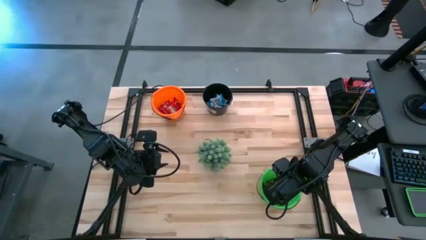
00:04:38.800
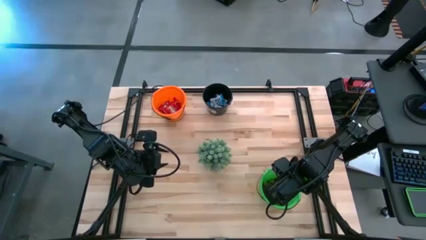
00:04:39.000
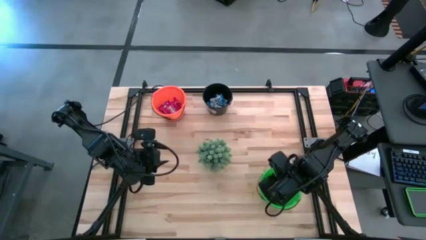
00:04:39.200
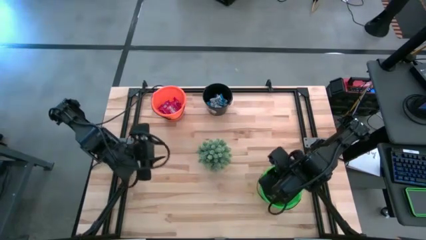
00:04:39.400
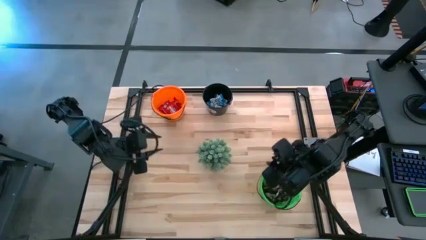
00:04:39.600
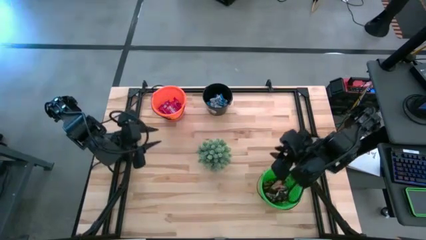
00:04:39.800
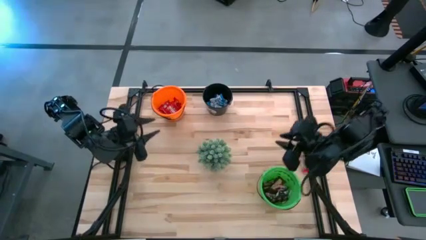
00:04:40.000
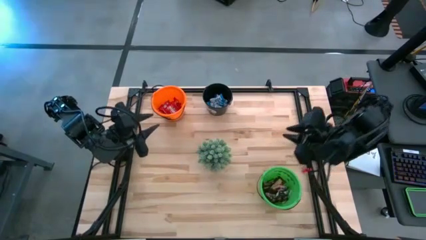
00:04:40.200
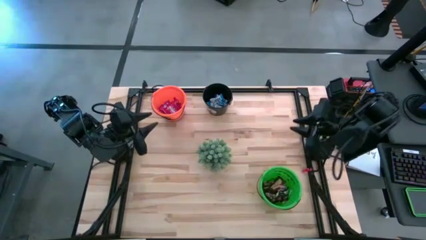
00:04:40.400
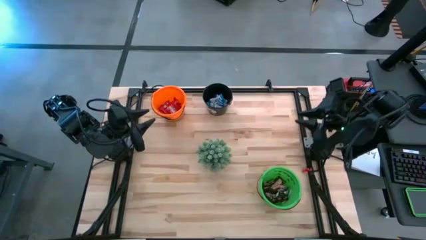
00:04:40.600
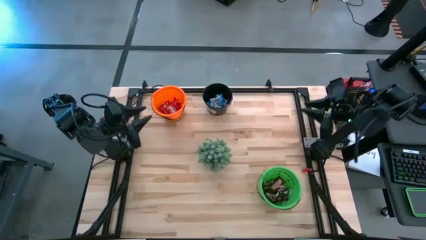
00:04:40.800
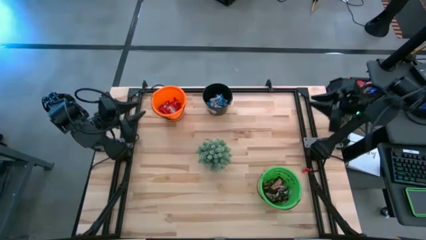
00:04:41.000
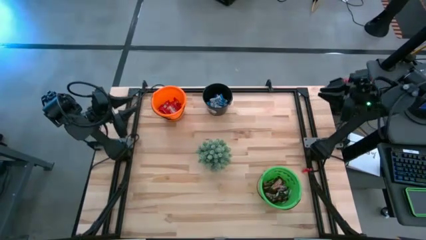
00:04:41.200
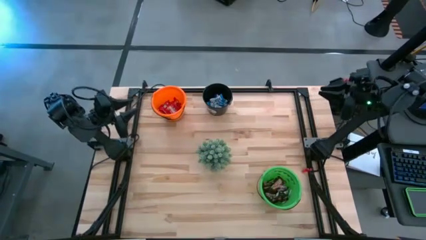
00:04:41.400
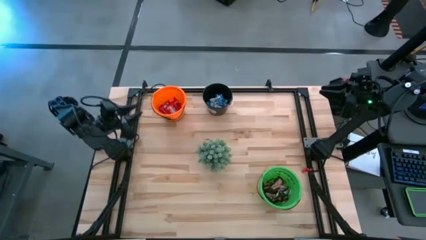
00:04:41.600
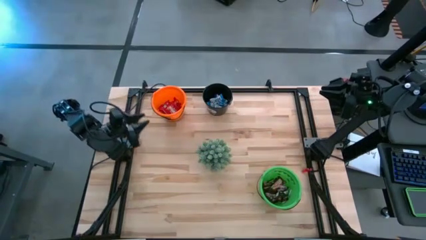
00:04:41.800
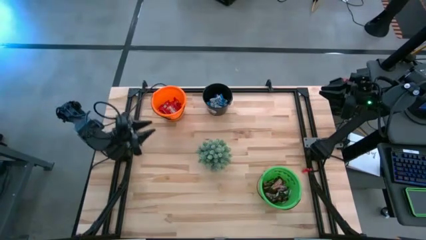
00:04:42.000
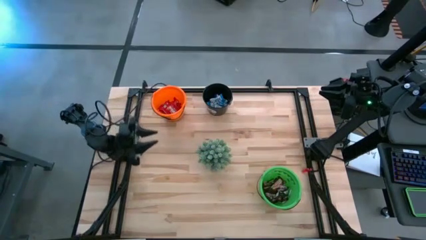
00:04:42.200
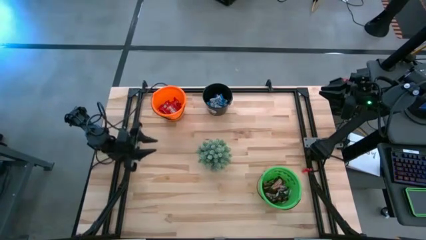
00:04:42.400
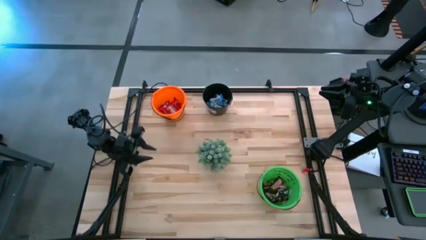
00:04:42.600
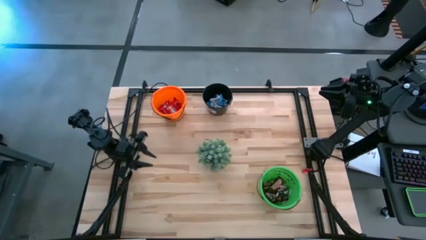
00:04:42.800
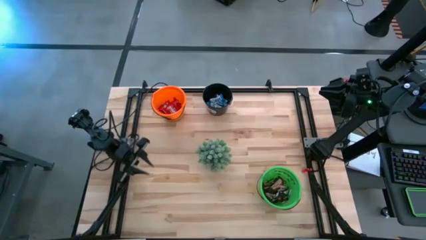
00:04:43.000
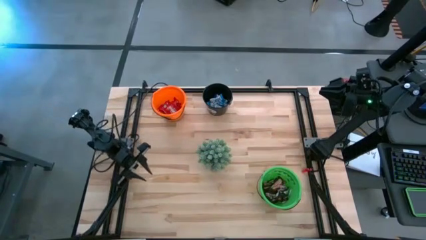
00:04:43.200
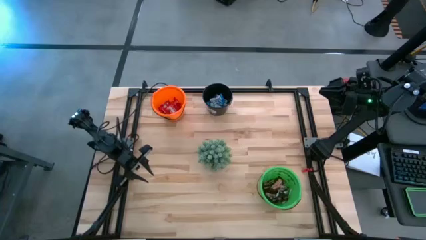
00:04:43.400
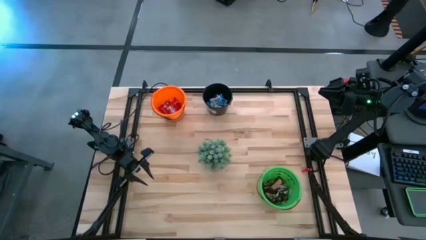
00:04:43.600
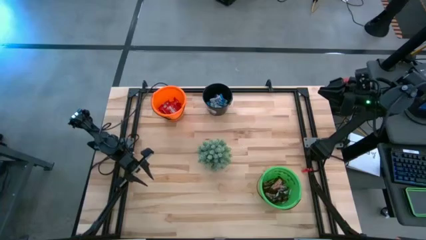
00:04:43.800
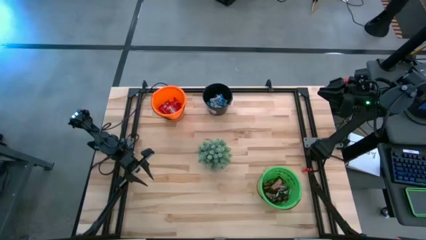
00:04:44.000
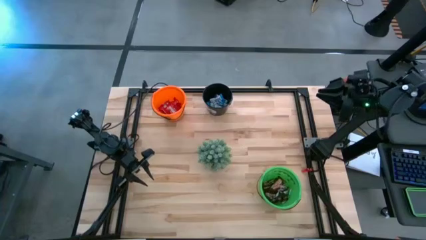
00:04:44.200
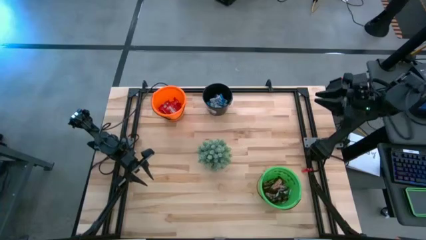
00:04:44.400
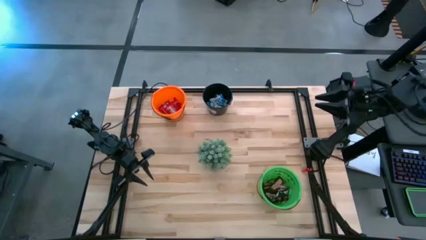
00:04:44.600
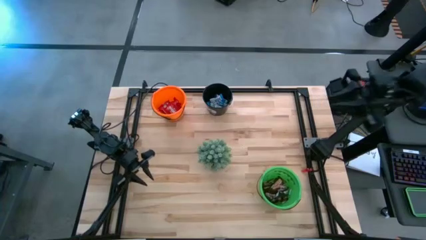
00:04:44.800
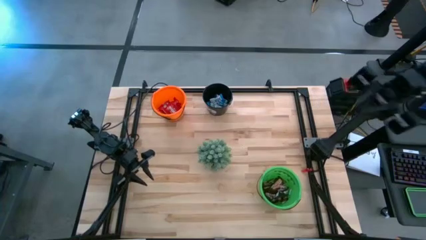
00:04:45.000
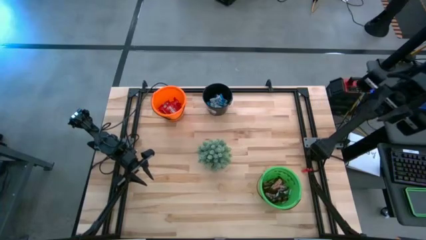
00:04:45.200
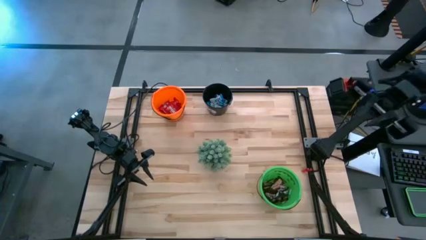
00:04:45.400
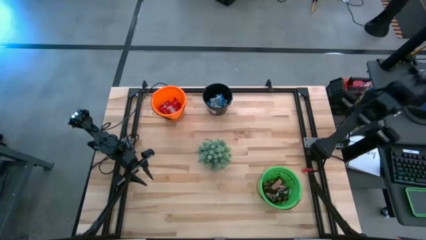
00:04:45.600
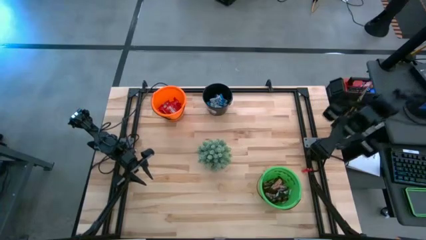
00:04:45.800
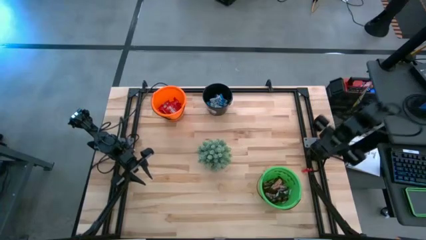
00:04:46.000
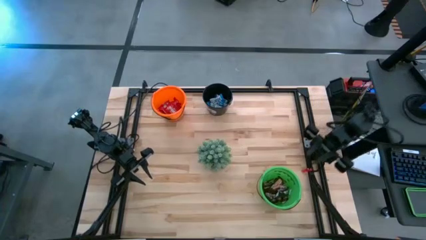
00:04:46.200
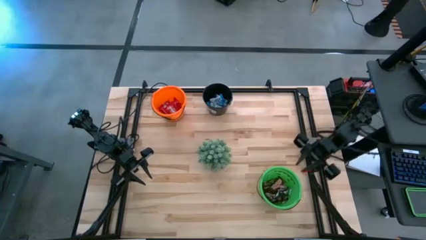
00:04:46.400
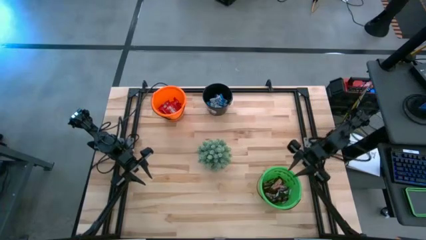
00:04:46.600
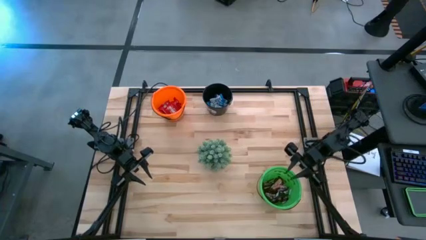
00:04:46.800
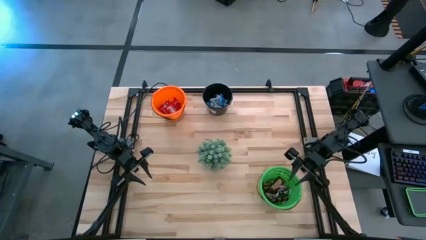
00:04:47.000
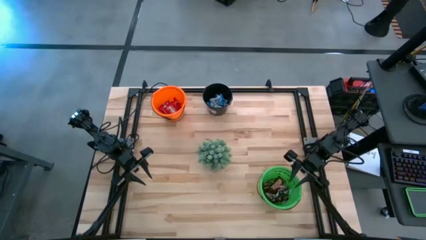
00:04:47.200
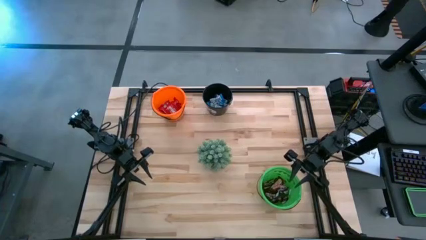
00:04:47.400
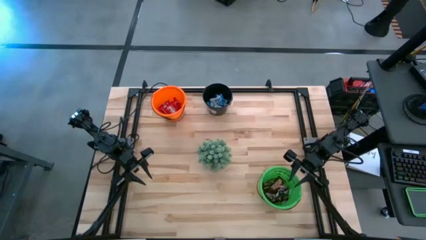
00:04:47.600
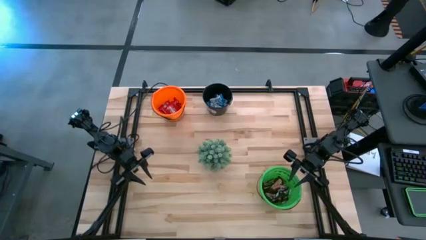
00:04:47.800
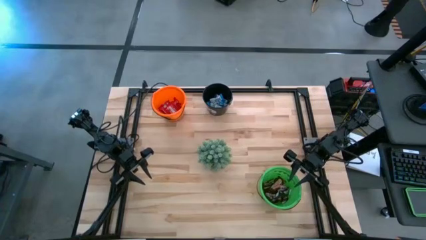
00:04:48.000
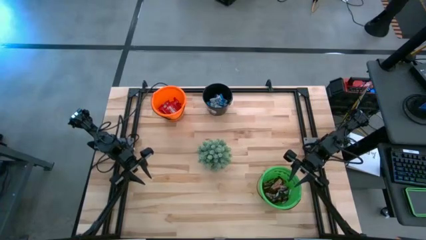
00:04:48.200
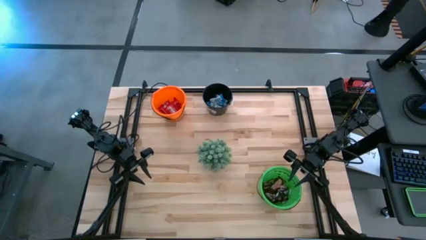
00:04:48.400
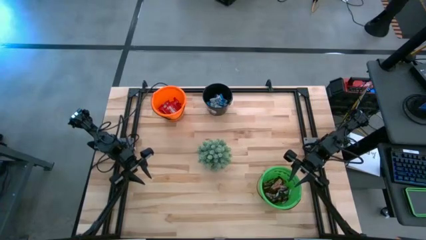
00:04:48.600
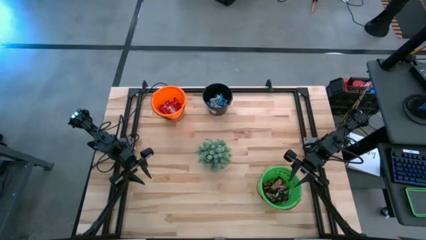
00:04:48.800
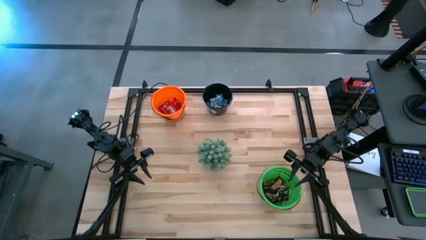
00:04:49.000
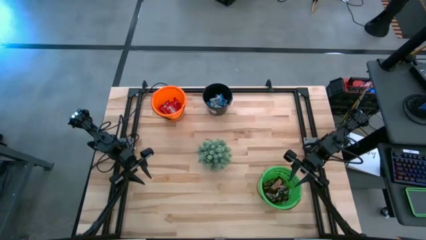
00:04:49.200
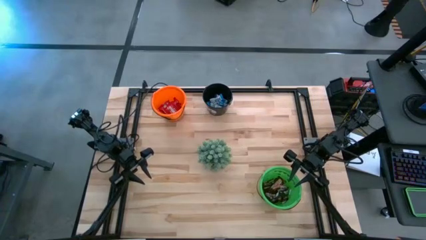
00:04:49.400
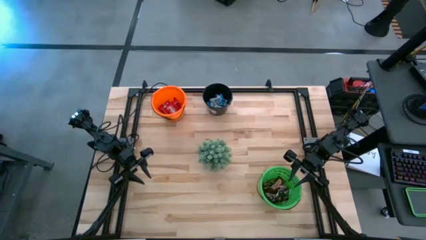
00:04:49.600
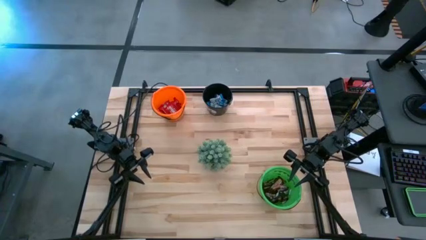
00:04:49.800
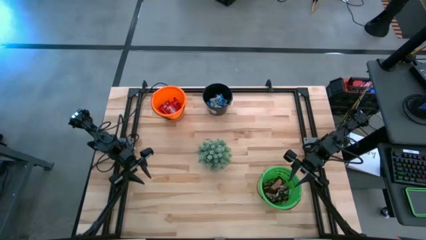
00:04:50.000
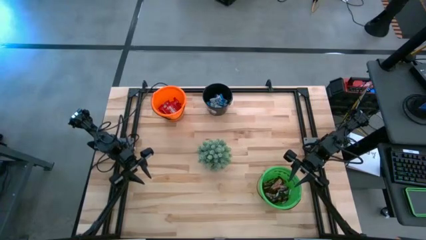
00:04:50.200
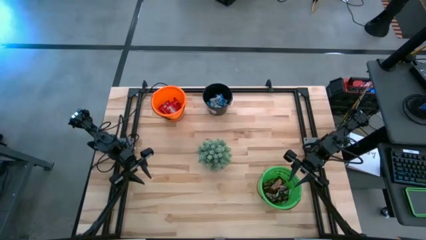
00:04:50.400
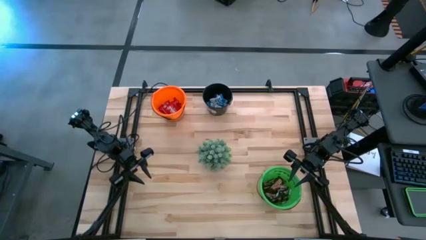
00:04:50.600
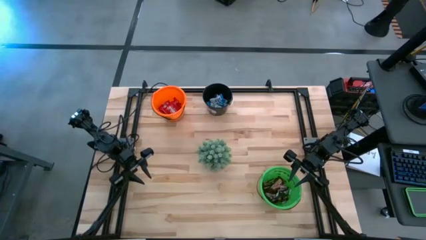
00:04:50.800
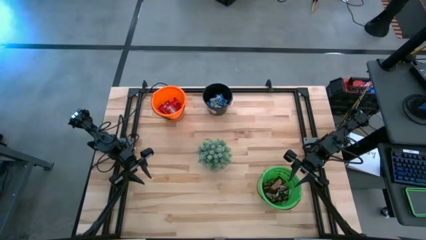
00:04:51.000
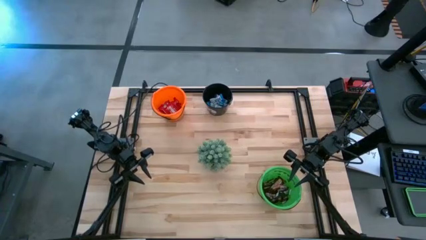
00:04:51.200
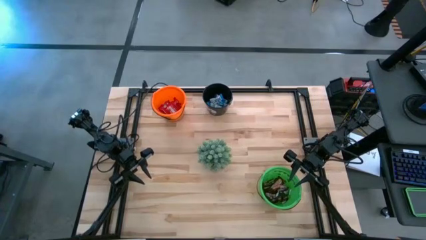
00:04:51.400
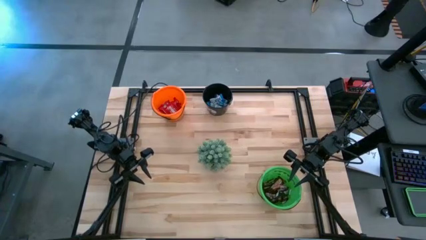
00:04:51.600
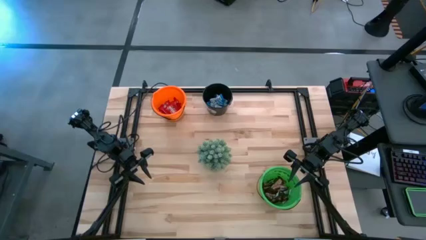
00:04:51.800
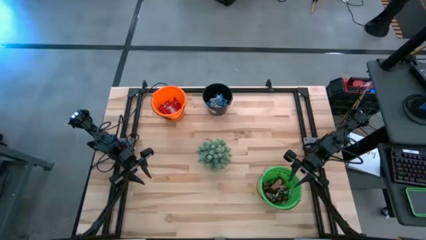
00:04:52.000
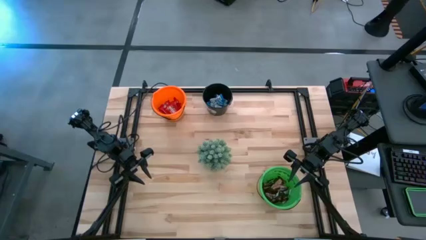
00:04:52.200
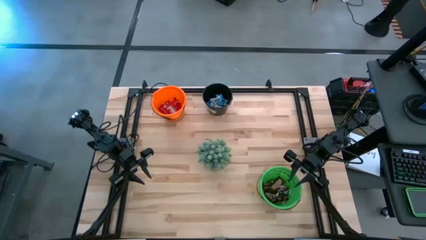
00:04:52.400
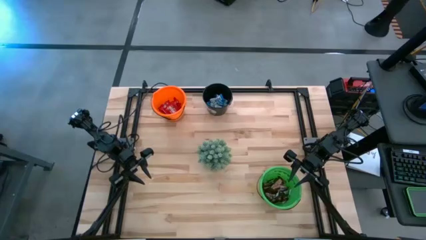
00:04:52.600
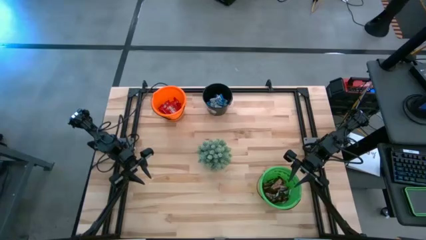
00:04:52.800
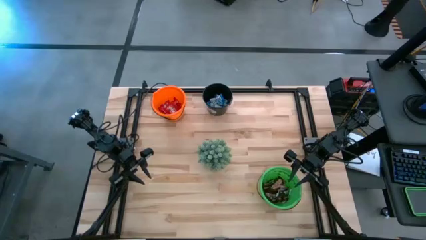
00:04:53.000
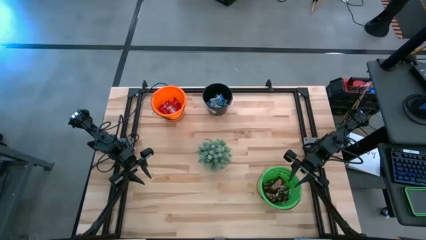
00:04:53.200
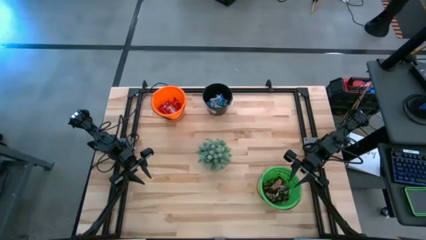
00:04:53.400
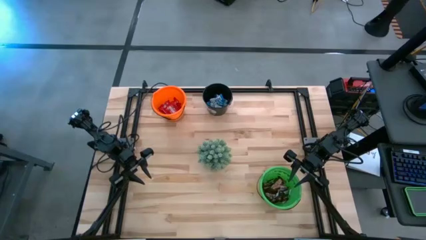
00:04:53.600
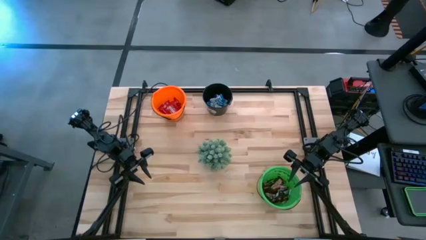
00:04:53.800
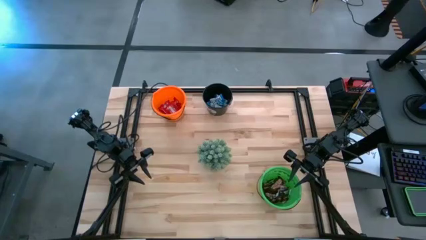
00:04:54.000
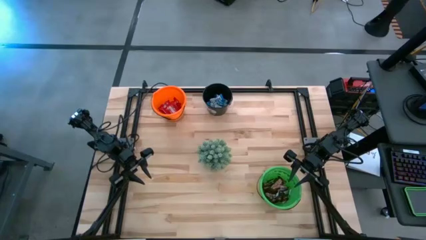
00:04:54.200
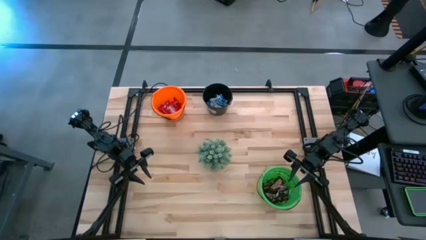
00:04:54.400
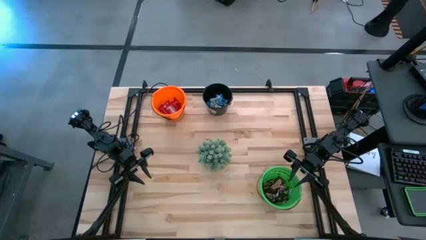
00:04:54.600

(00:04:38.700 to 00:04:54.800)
Task: Organize candy in baskets
Return to Home Position
